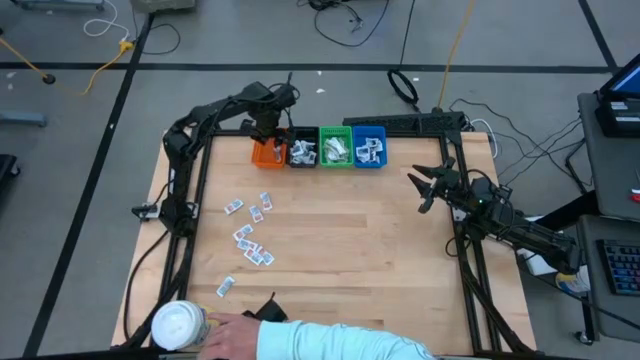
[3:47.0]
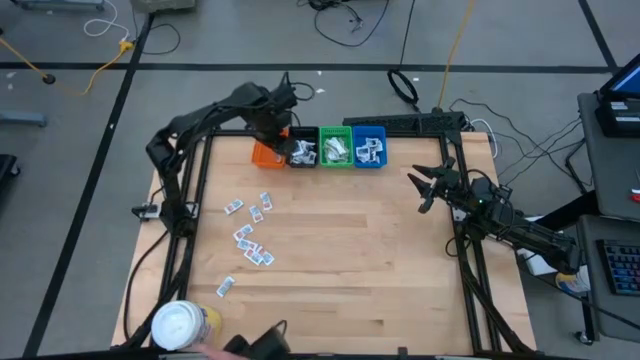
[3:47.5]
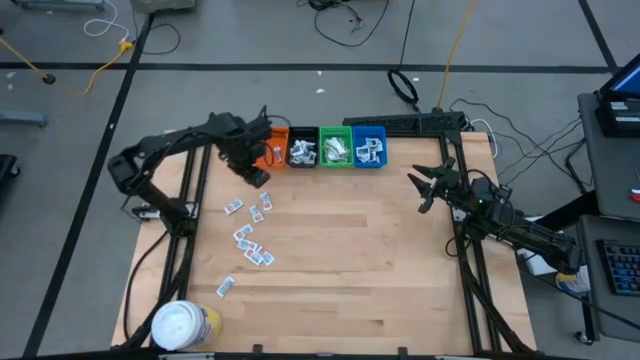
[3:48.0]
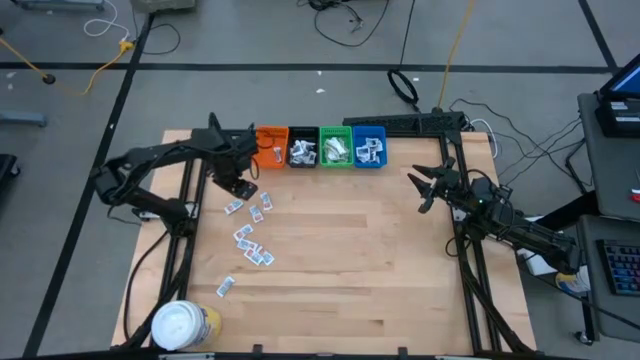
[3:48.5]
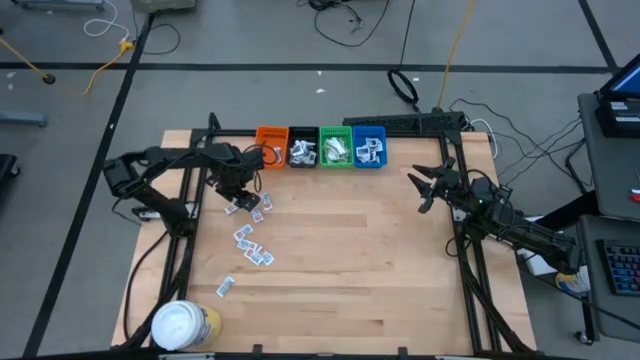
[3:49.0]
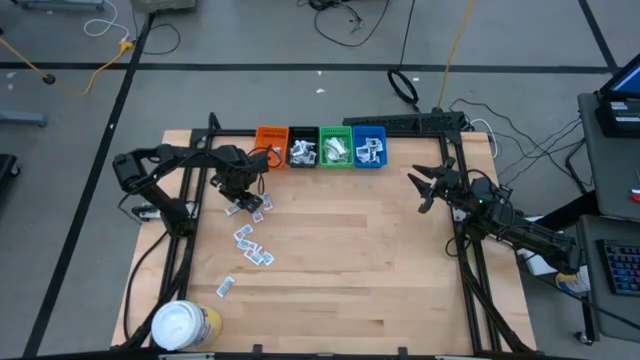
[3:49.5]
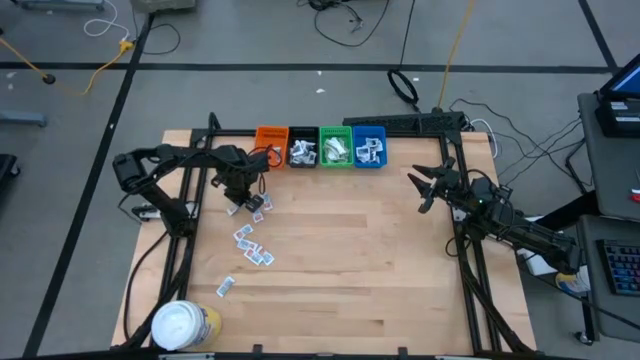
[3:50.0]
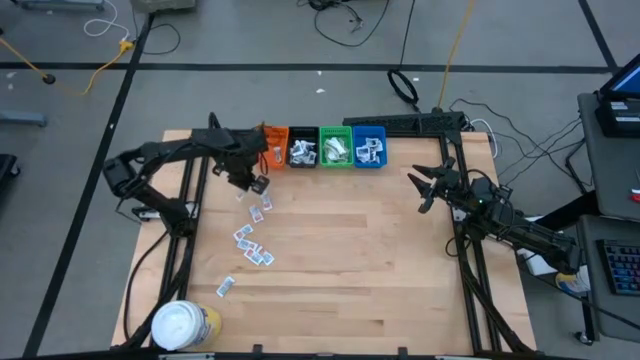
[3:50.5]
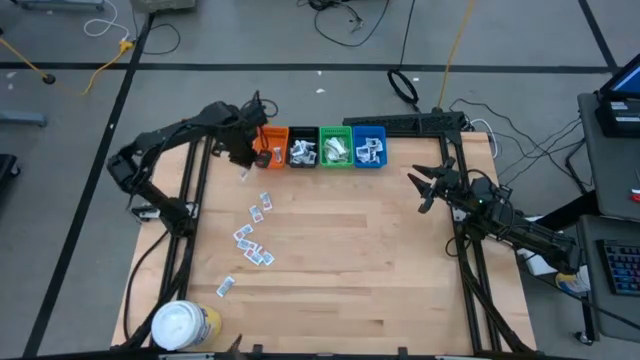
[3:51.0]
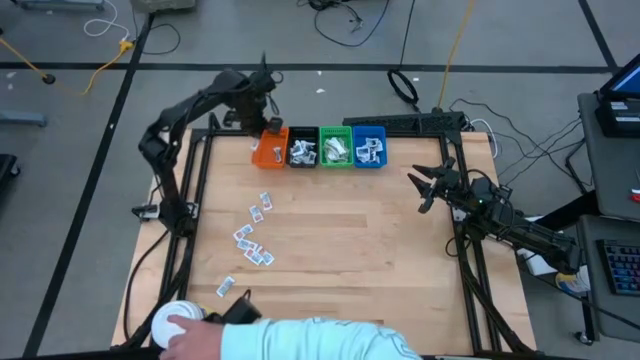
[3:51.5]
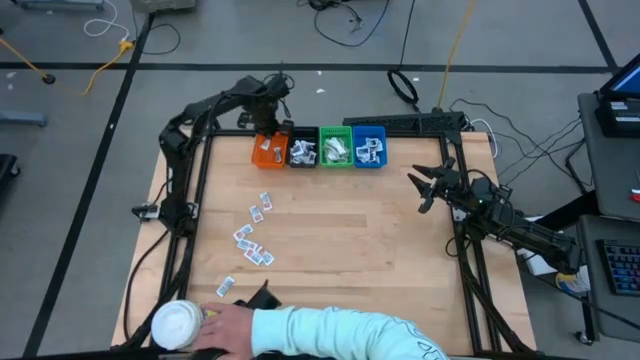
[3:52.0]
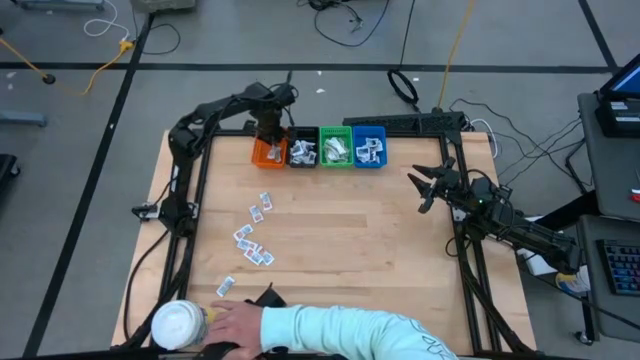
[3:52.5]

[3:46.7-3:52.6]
Task: Pick & Place First Aid Supplies
Put the red packet into the orange bin

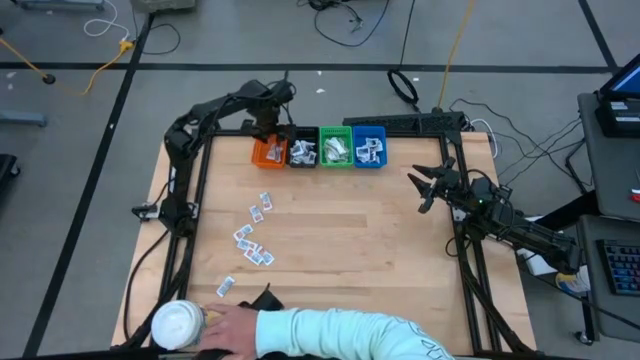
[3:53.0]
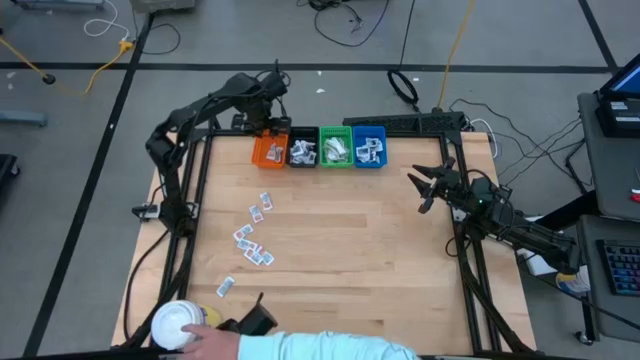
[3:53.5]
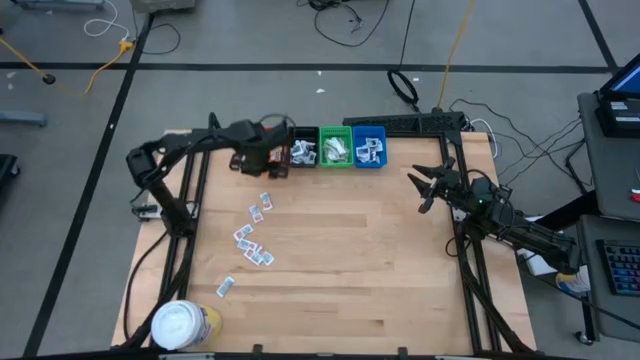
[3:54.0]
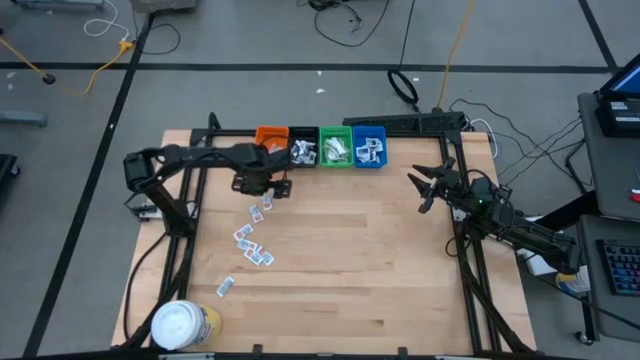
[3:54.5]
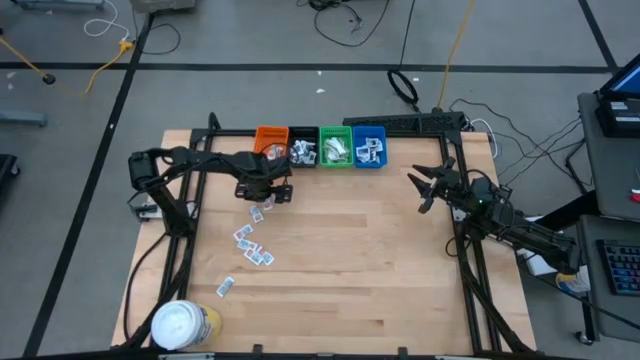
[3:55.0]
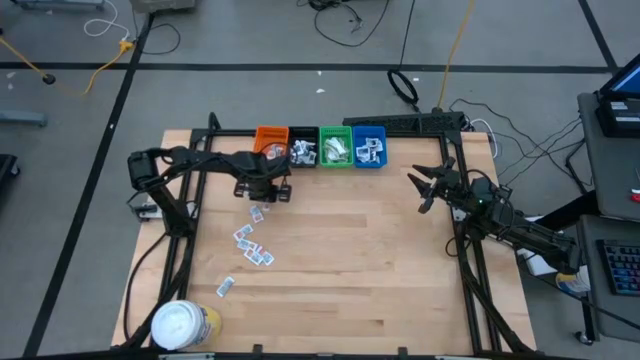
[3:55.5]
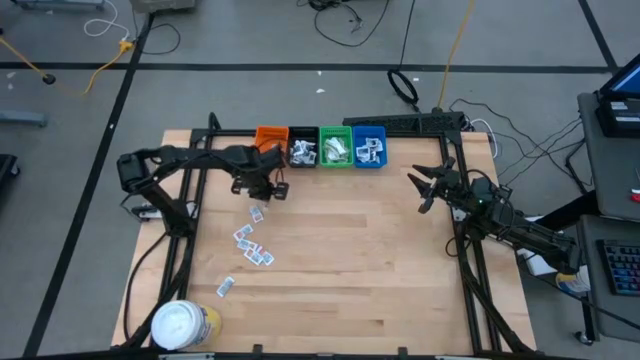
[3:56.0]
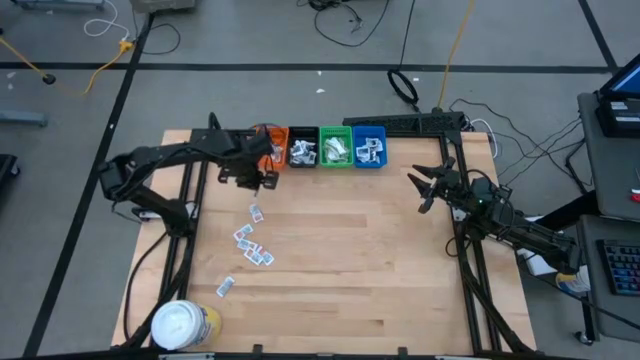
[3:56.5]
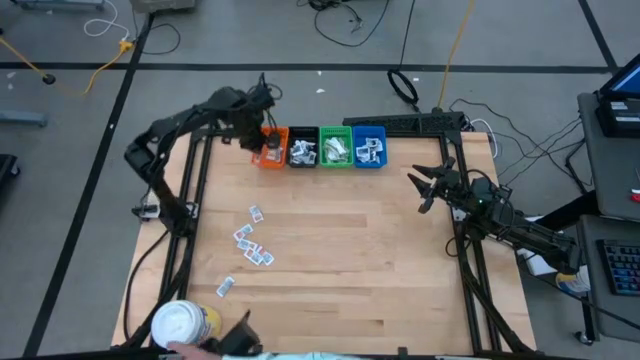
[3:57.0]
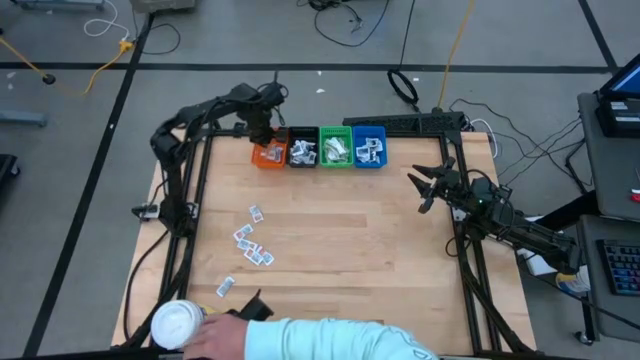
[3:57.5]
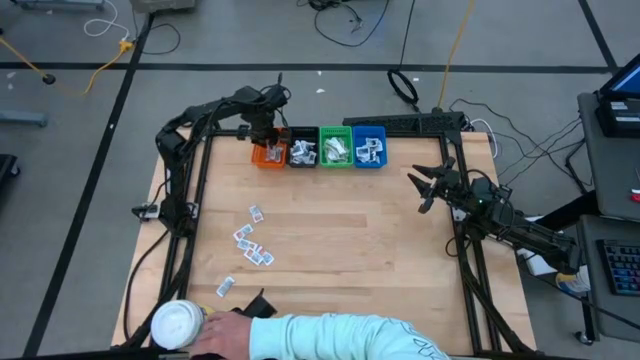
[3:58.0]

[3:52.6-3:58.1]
Put the red packet into the orange bin

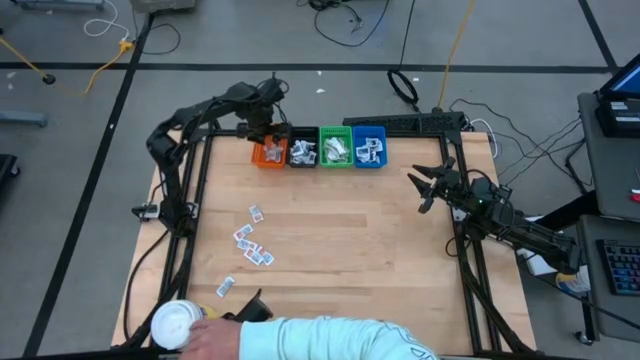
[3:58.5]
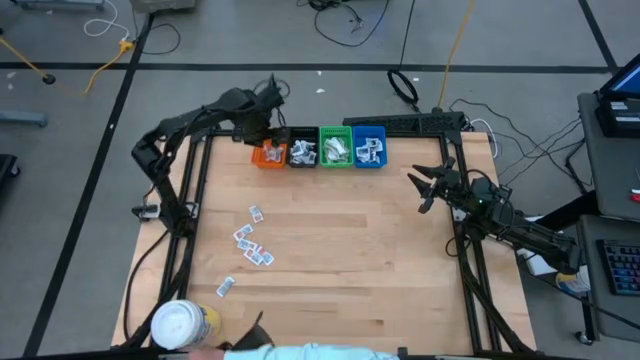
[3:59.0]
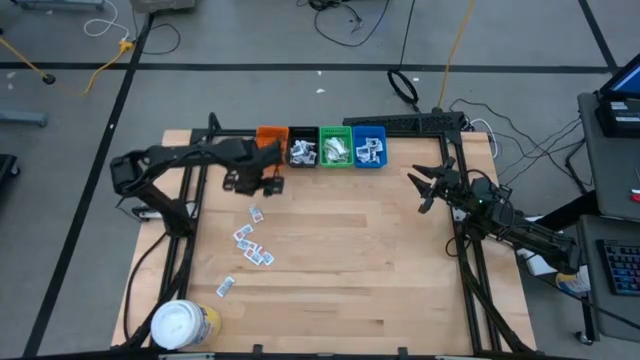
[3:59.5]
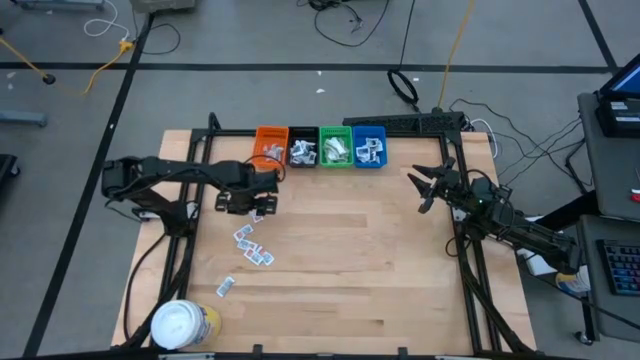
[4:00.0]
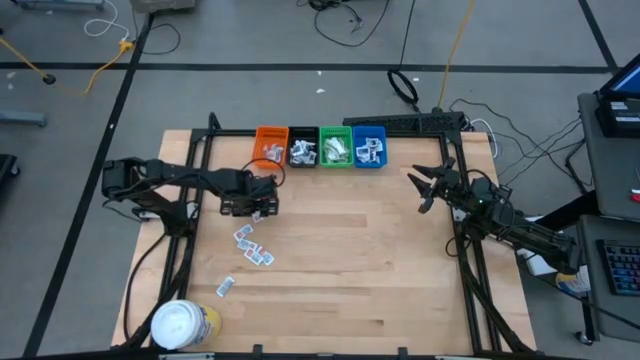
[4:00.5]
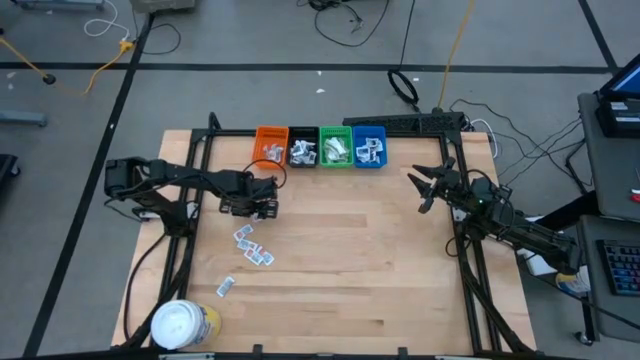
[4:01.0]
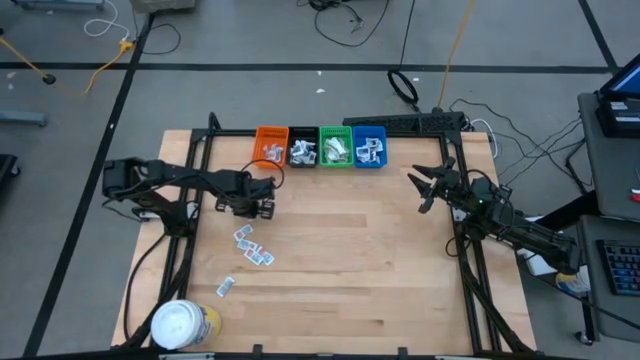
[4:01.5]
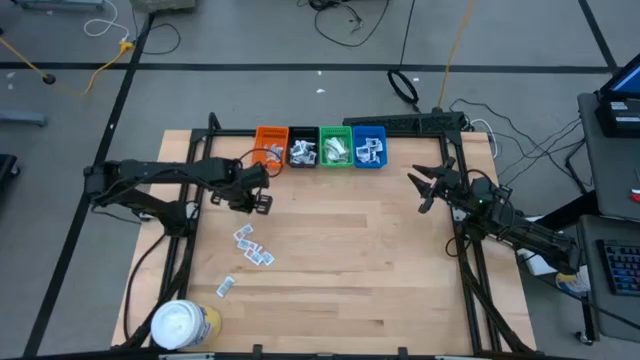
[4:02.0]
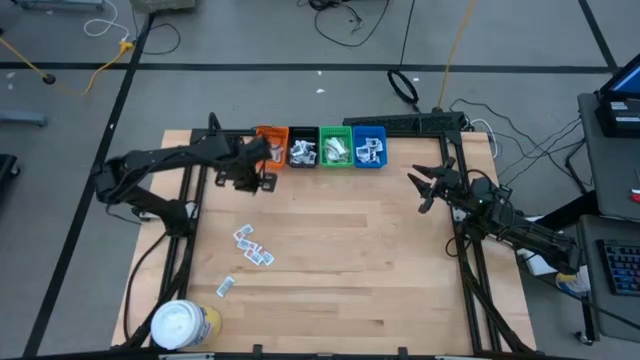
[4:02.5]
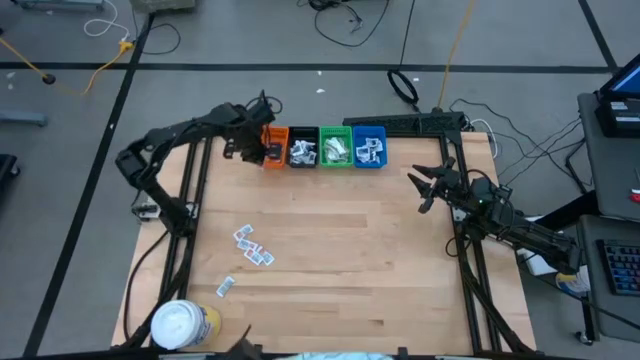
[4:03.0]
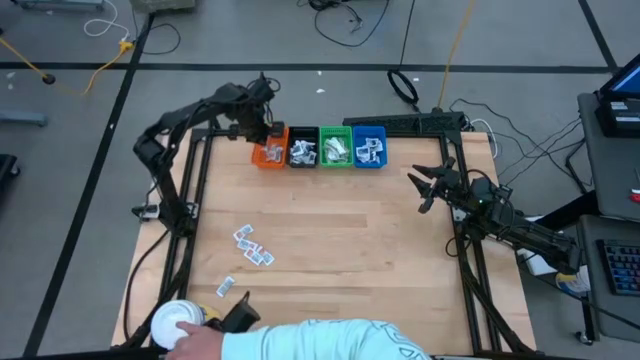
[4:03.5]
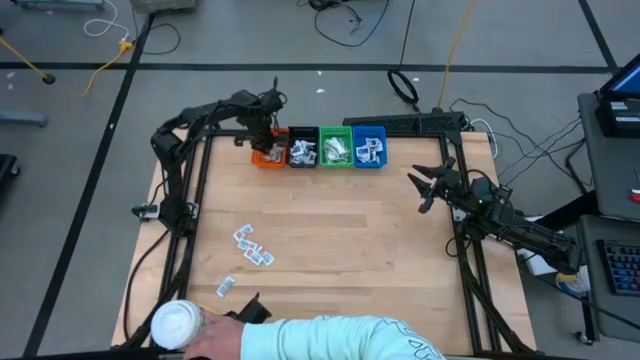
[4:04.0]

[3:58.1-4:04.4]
Put the red packet into the orange bin

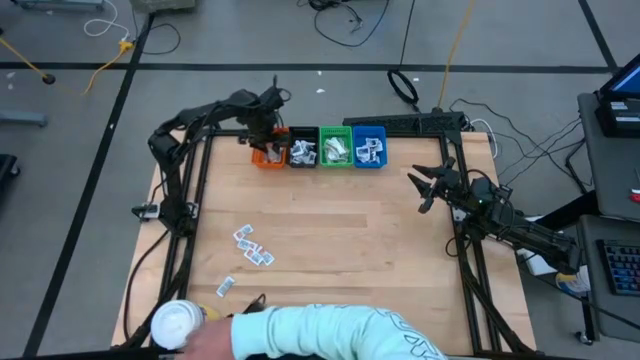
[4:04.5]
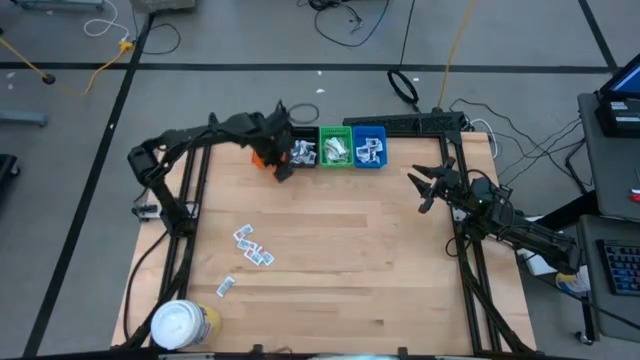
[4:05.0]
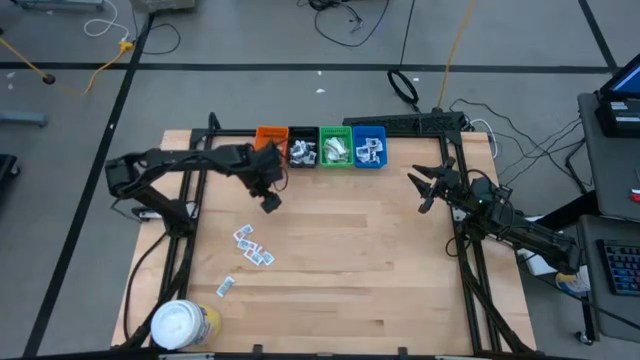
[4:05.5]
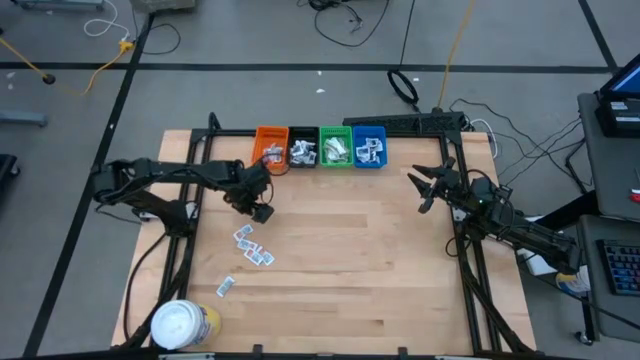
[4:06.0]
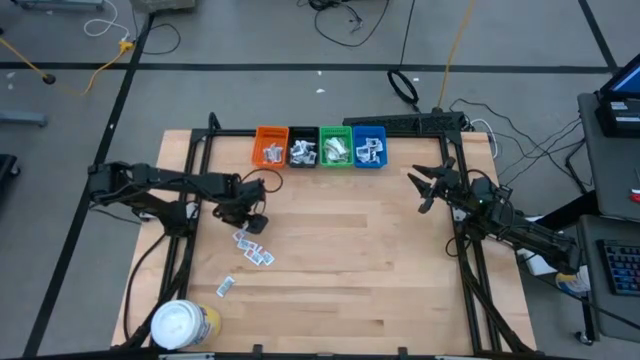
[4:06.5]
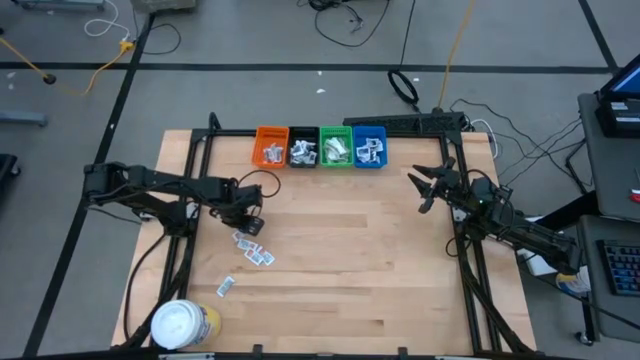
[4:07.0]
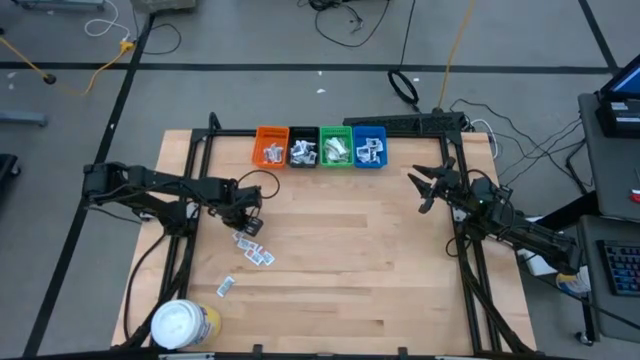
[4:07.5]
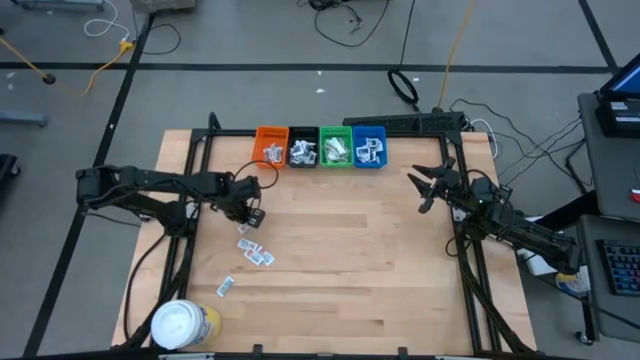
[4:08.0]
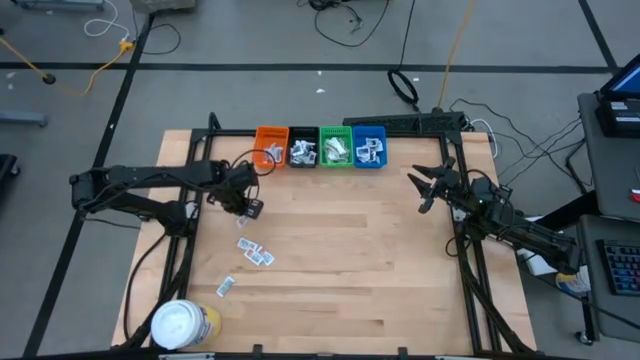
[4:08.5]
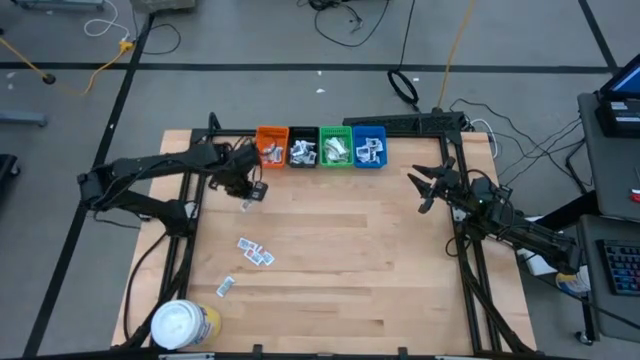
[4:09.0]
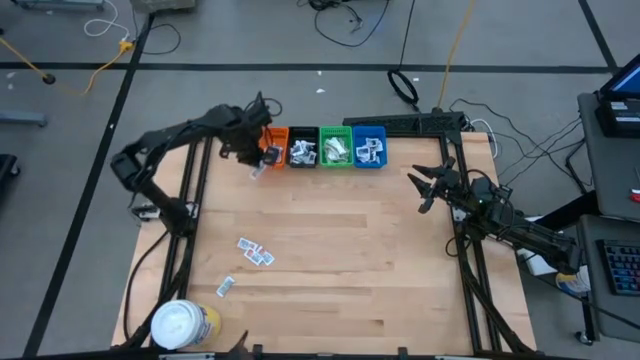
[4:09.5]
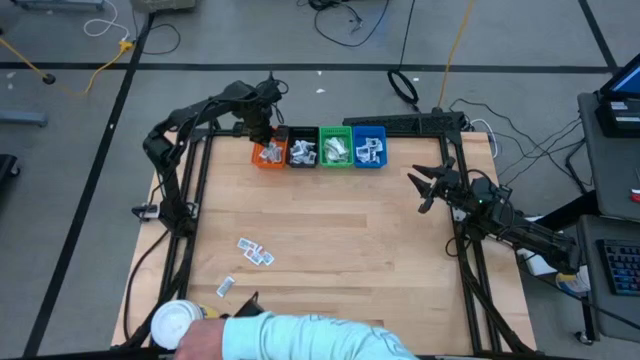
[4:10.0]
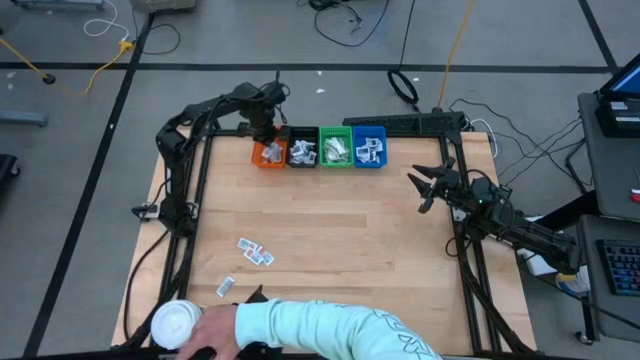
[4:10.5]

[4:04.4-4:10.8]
Put the red packet into the orange bin
